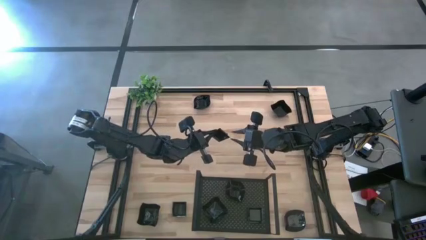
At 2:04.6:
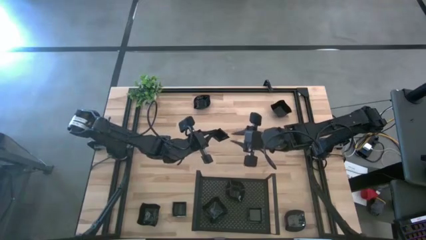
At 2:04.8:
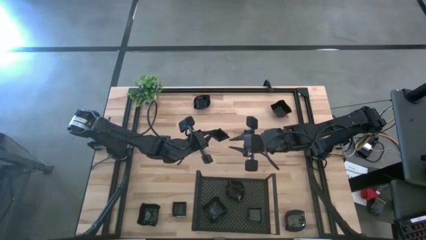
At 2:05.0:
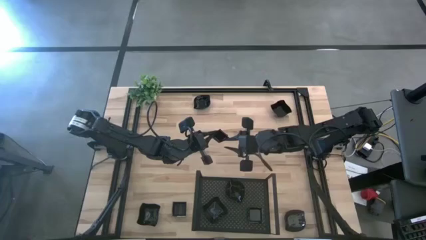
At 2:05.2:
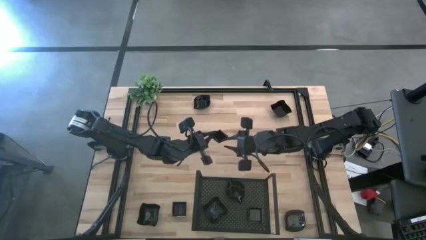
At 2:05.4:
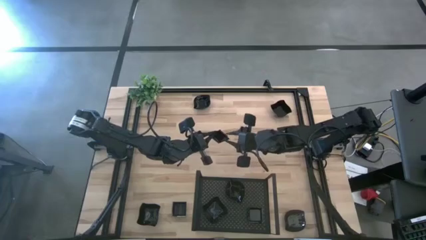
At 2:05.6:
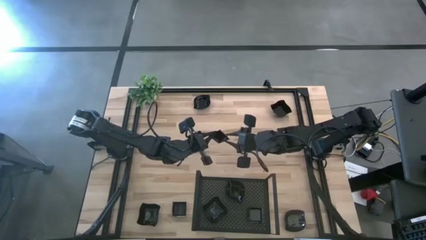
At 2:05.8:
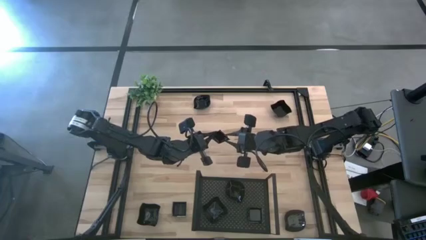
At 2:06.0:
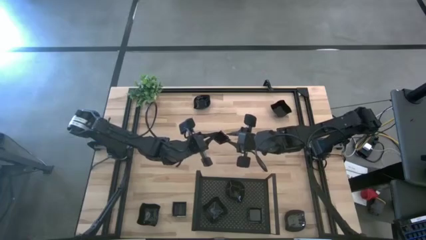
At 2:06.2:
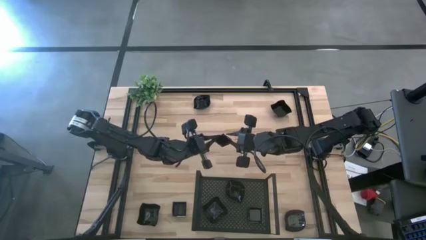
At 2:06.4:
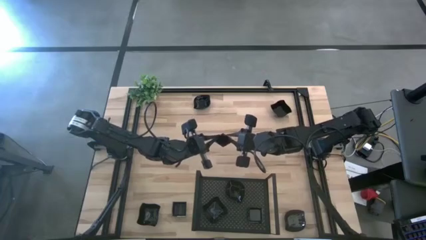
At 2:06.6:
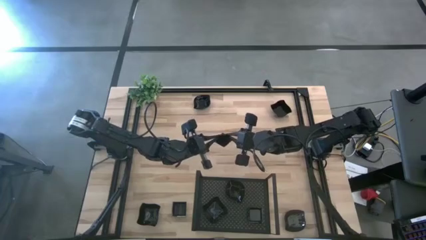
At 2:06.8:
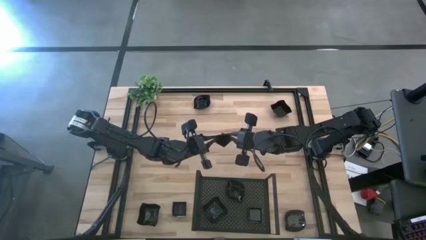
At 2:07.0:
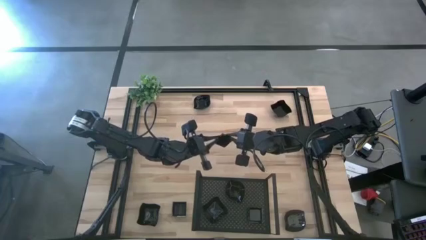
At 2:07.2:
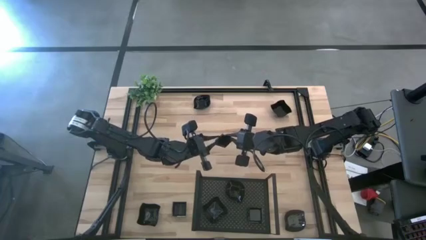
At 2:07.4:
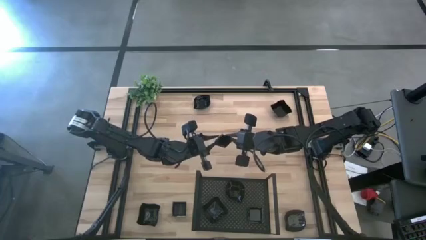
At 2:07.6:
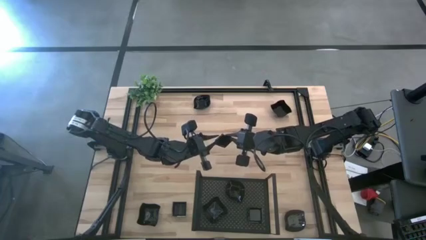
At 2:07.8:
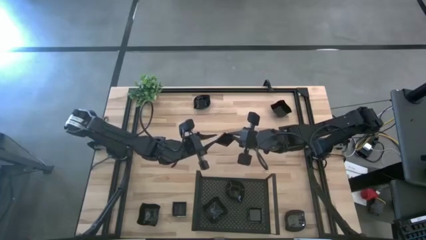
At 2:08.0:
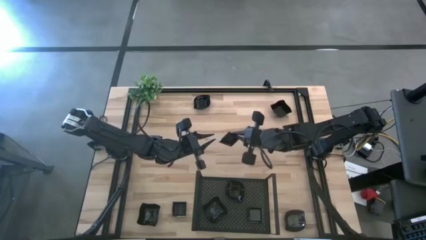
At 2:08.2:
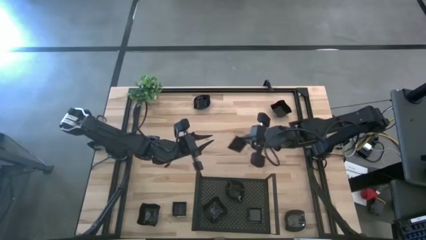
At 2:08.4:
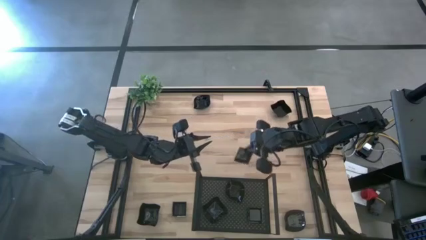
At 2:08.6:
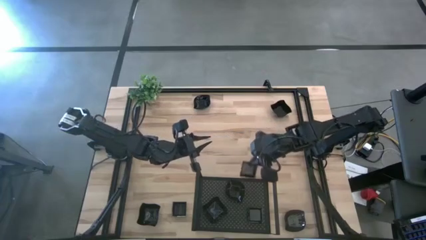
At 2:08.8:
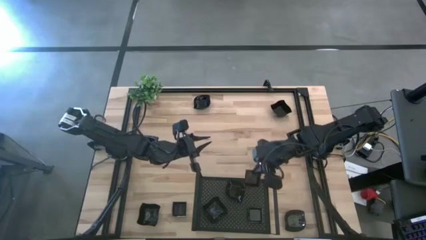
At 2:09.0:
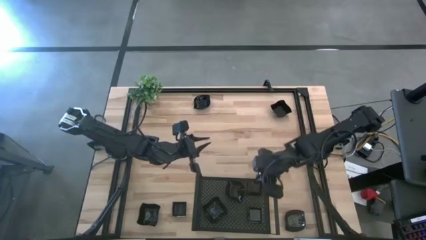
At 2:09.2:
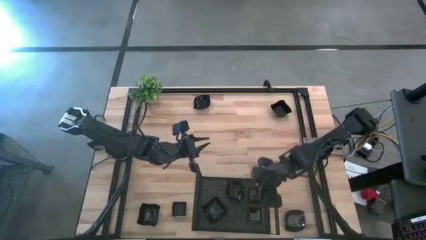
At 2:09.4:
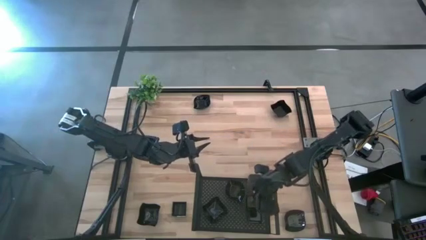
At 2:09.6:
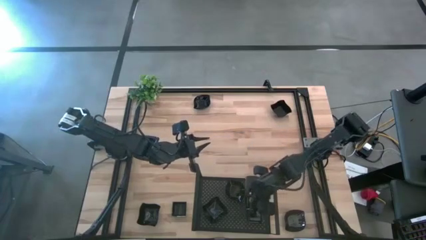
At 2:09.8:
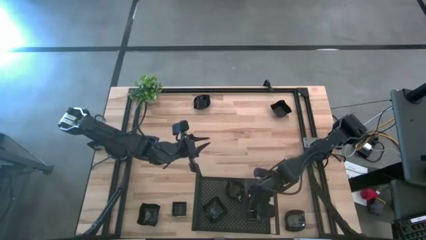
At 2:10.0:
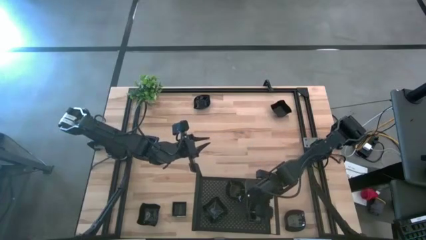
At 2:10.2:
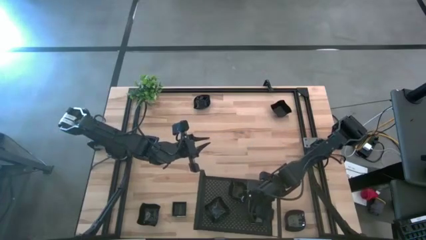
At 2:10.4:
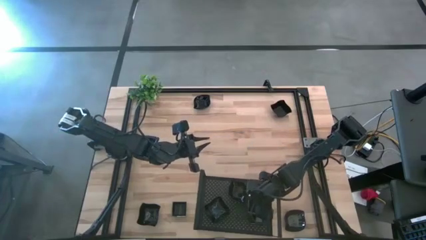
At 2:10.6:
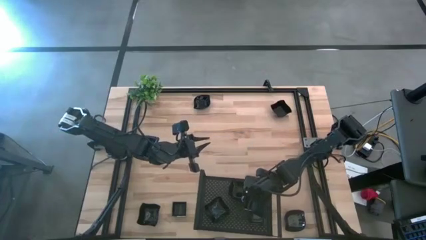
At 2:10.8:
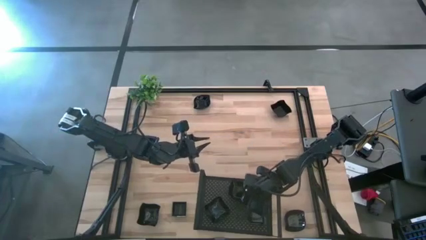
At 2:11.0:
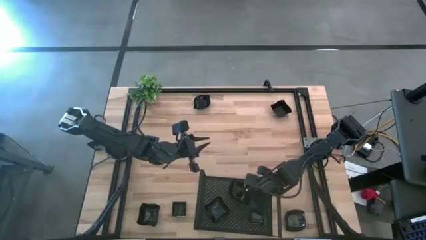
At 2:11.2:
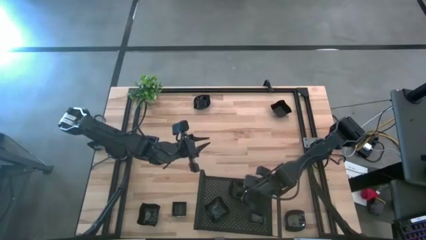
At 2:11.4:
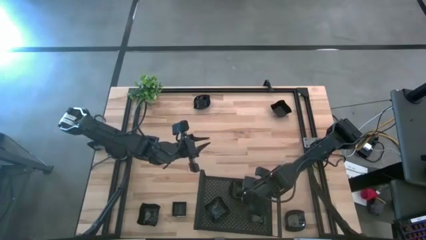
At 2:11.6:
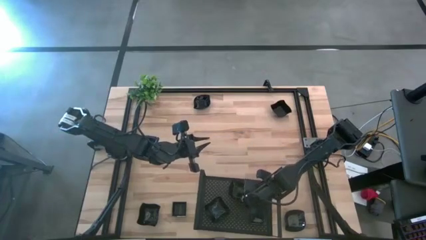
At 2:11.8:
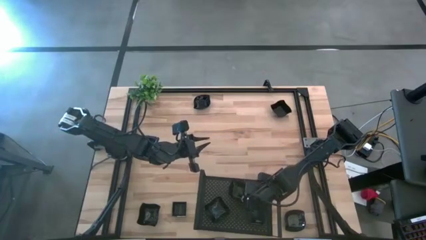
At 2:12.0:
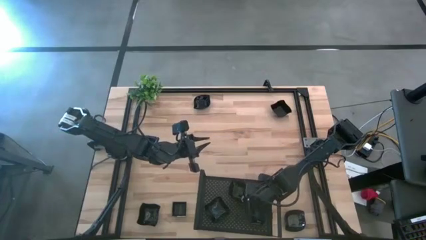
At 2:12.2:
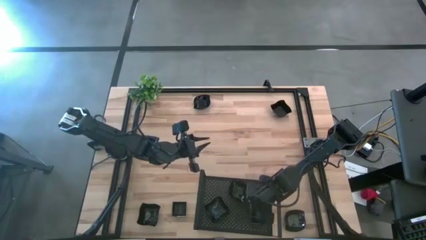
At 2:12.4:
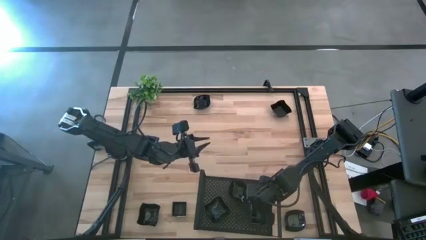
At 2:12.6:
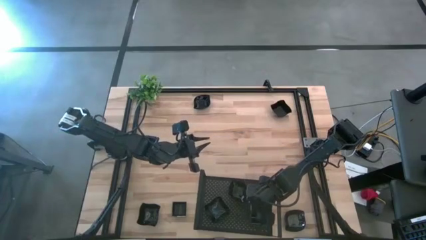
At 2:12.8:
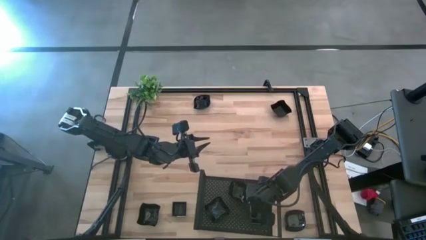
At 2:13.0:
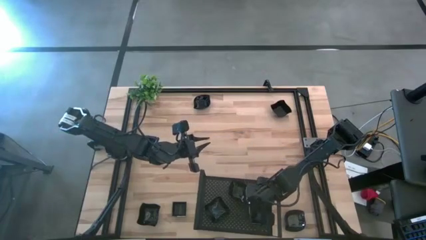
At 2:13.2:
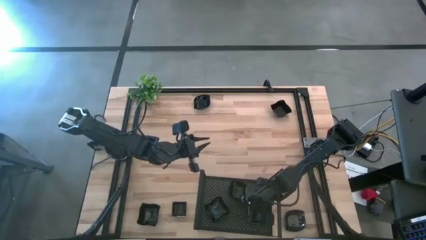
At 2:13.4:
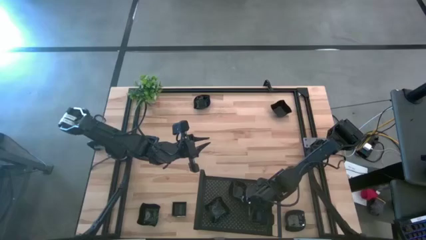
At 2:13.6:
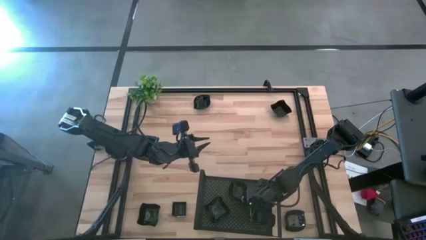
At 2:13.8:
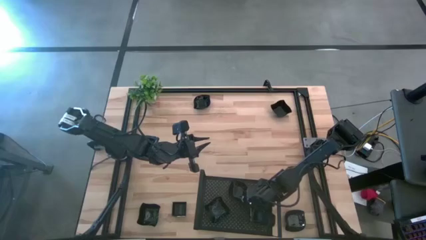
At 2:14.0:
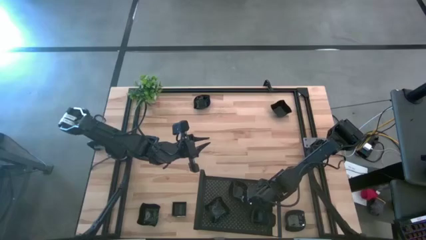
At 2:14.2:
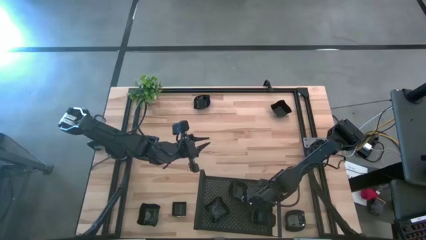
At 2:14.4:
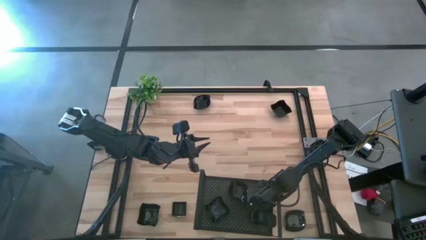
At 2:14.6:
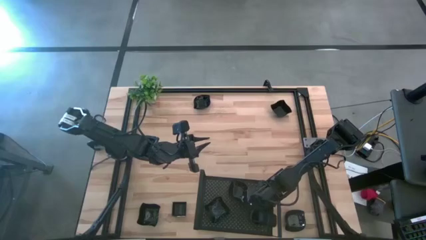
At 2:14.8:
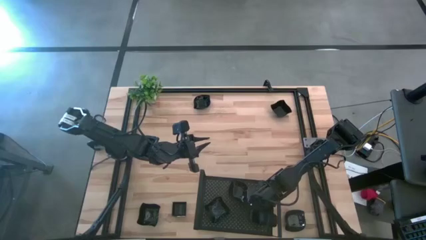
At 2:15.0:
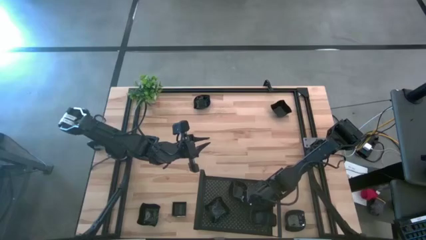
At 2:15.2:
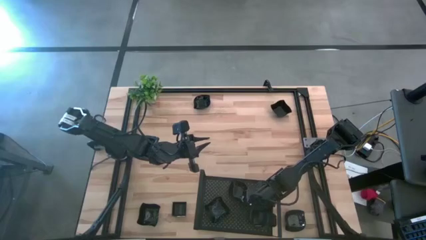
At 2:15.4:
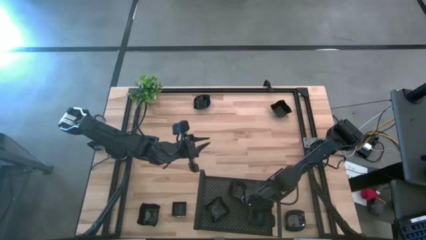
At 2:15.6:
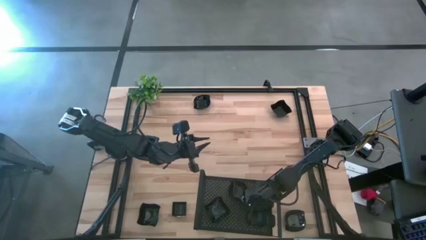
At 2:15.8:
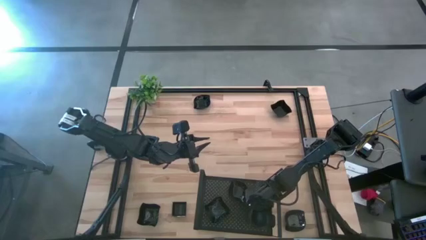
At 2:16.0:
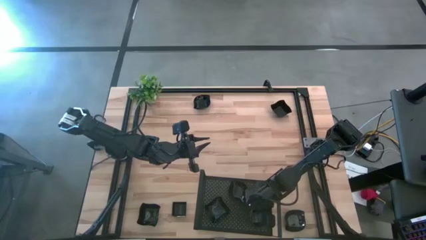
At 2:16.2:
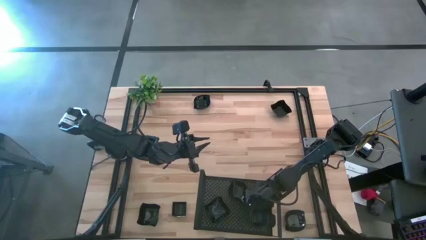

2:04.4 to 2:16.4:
Task: Pick & Place Mini shaped plates
Stack the square plate on top of the other square plates on the shelf

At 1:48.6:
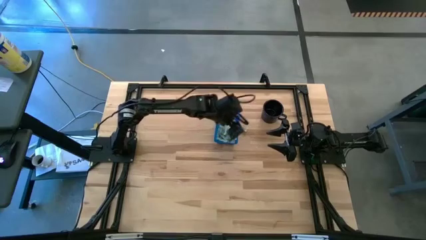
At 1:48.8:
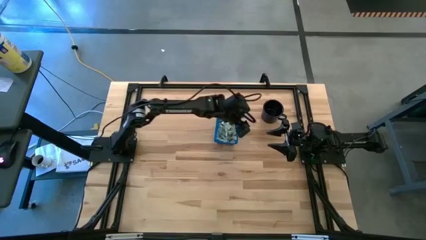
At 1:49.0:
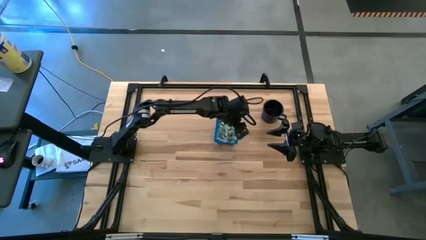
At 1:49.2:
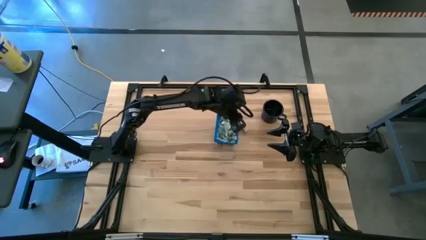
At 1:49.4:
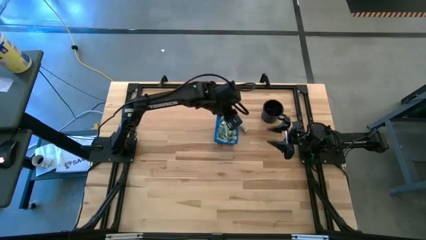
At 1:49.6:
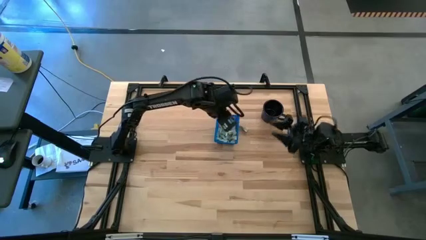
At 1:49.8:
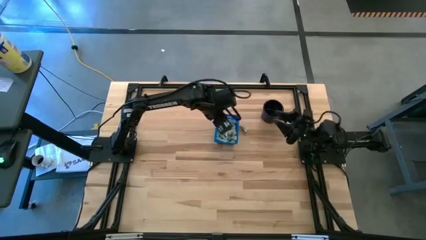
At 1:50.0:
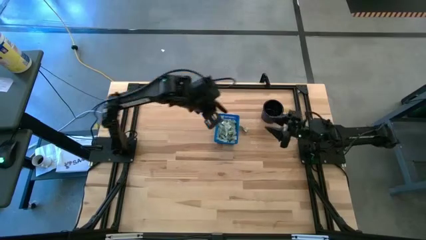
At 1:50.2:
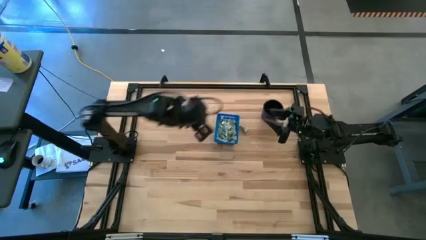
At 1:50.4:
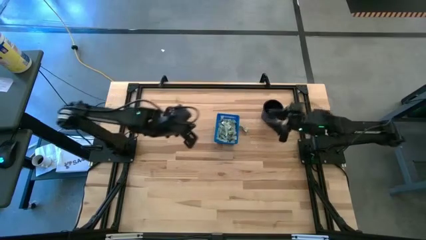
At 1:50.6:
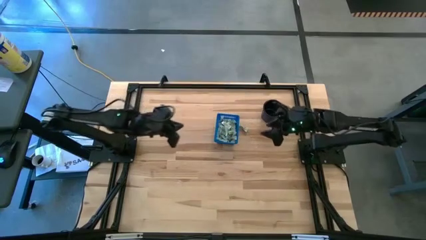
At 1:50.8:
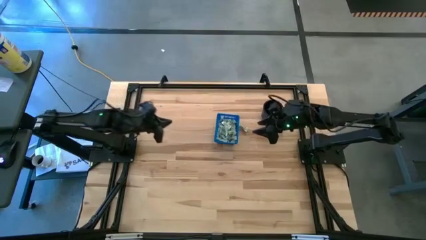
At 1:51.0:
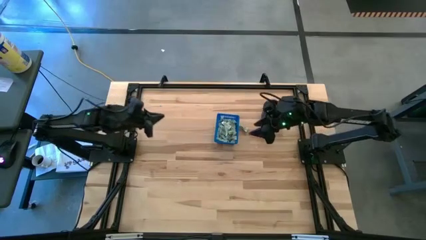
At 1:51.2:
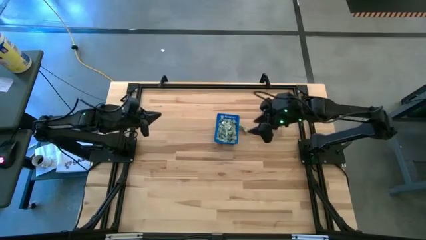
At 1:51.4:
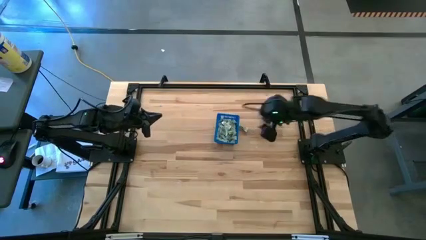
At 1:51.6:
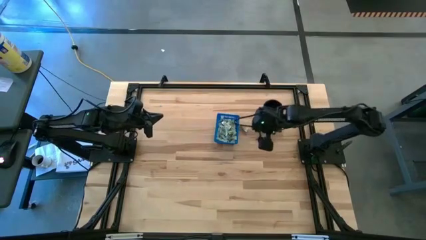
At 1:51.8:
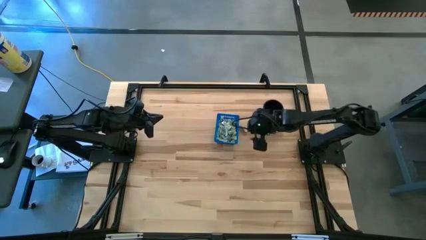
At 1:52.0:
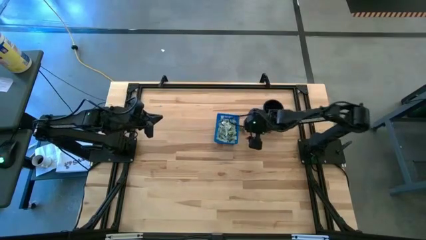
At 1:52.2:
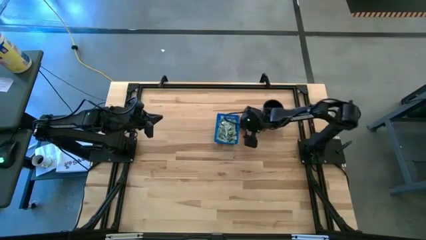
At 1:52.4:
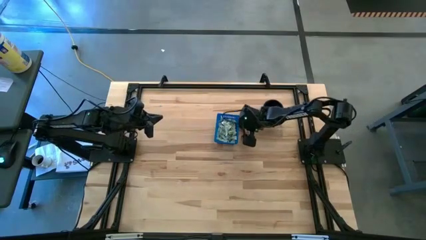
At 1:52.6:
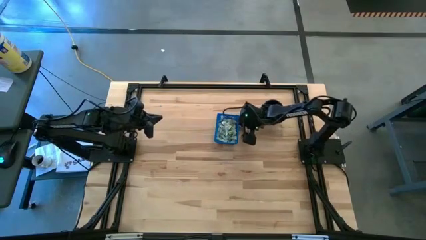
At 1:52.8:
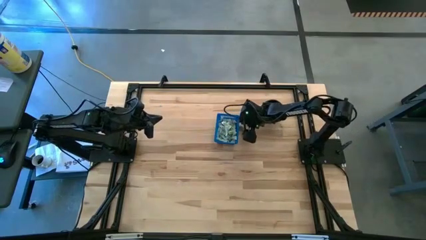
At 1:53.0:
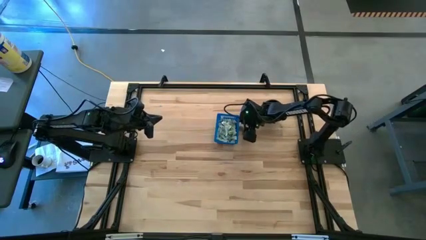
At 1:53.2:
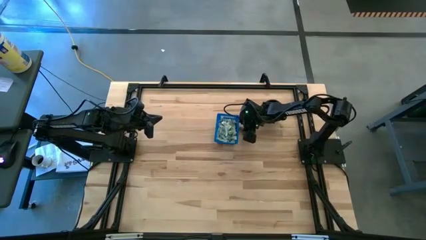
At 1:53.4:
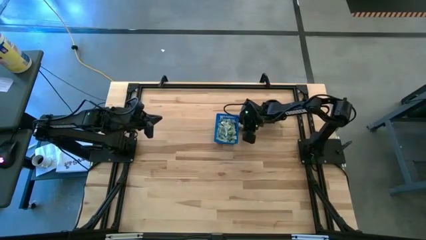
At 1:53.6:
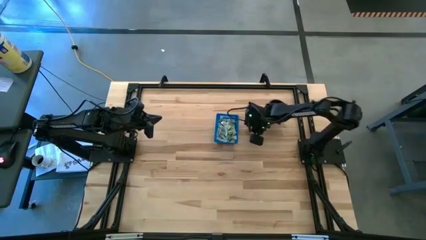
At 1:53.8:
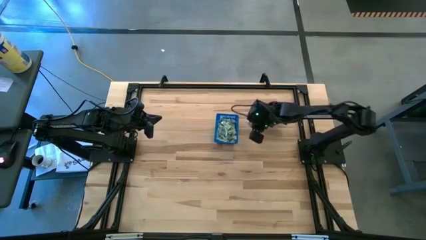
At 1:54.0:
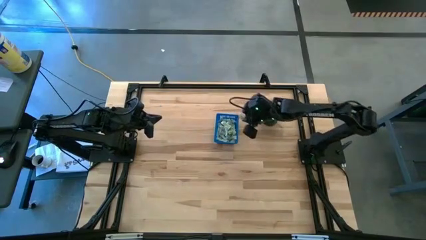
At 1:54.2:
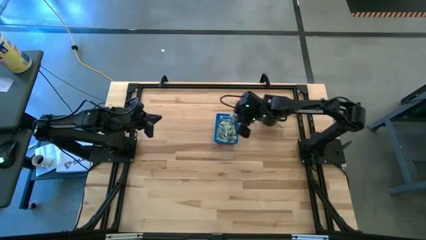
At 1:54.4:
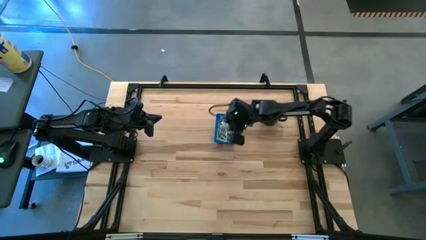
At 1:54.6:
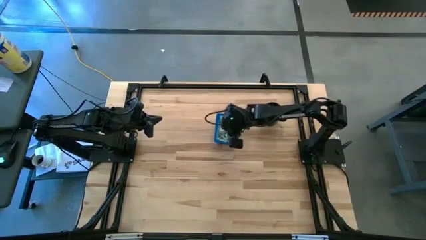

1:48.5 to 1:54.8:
Task: Pick and place Stevia / Truvia into bins
Put the stevia packet into the basket
